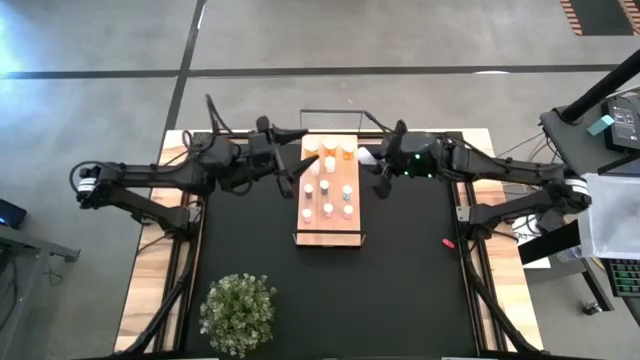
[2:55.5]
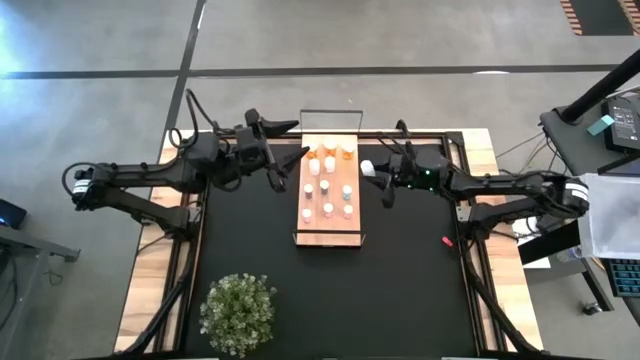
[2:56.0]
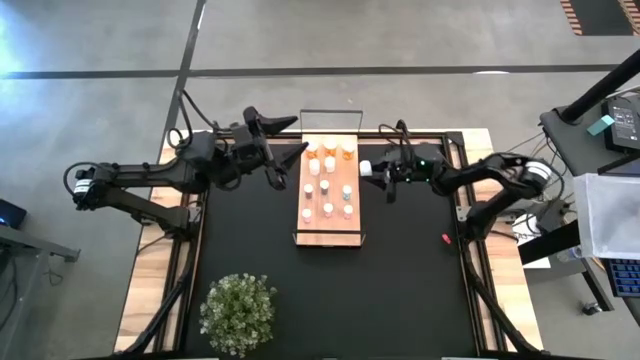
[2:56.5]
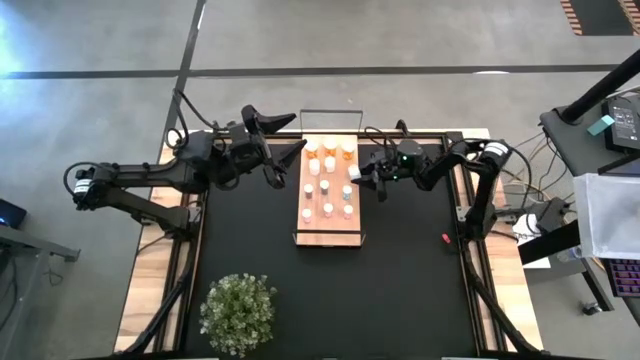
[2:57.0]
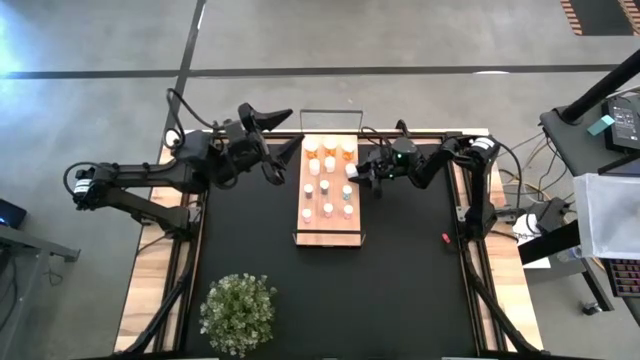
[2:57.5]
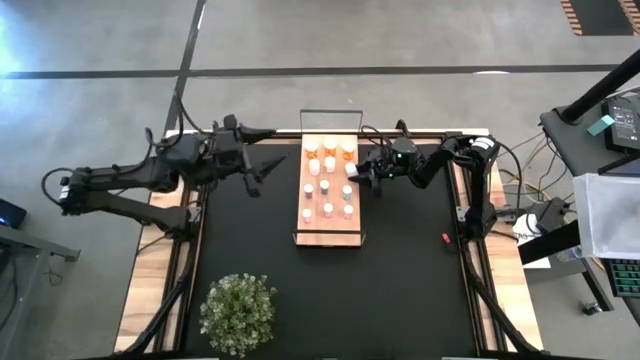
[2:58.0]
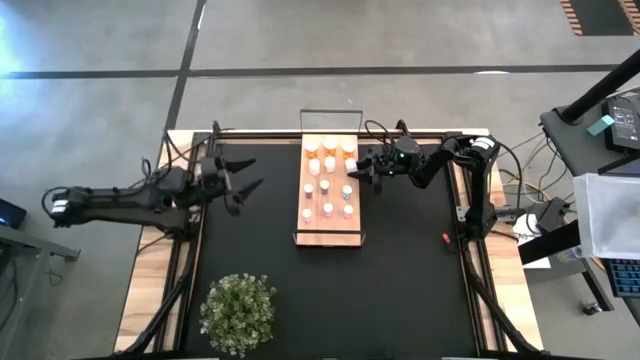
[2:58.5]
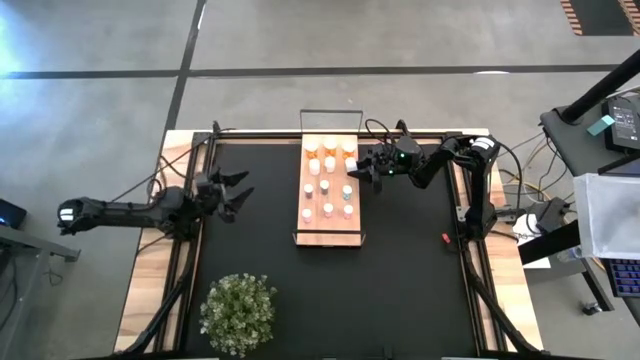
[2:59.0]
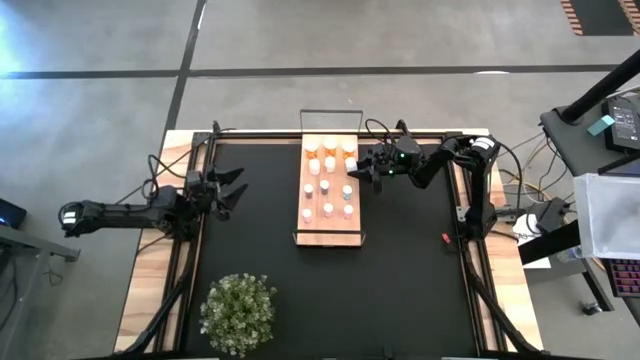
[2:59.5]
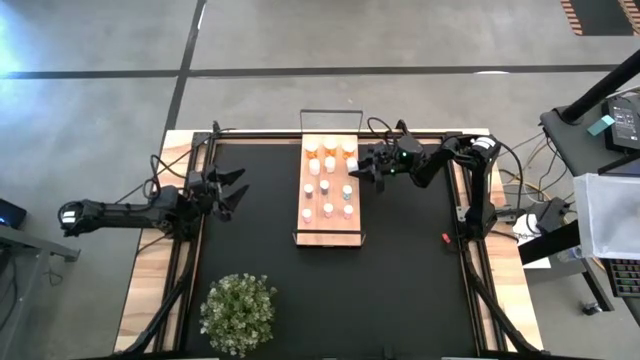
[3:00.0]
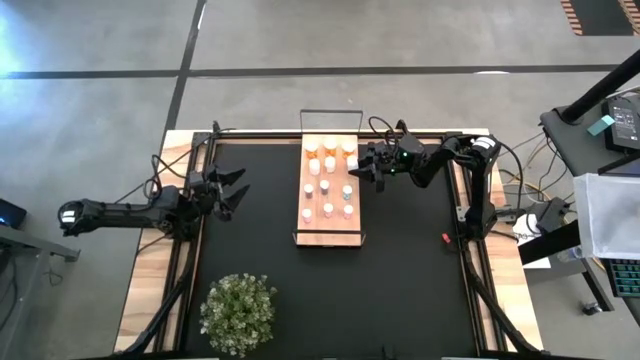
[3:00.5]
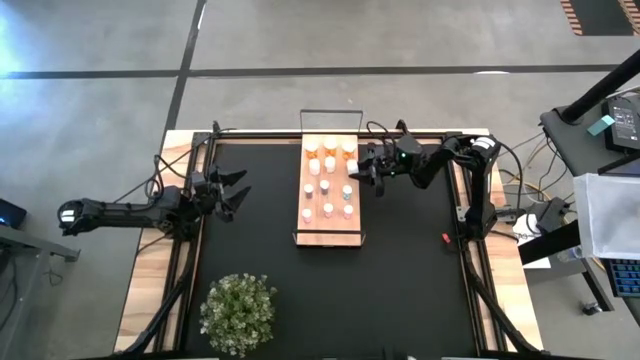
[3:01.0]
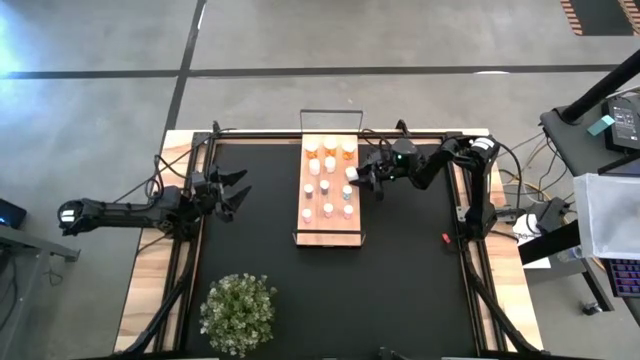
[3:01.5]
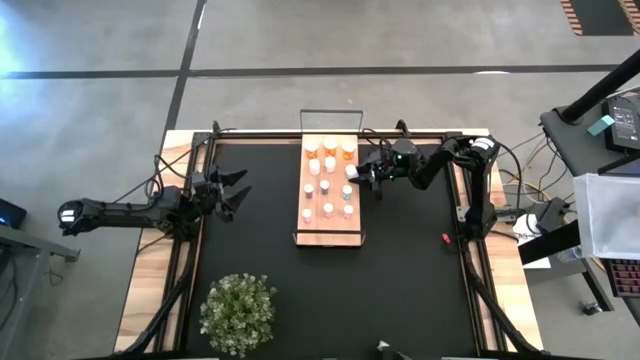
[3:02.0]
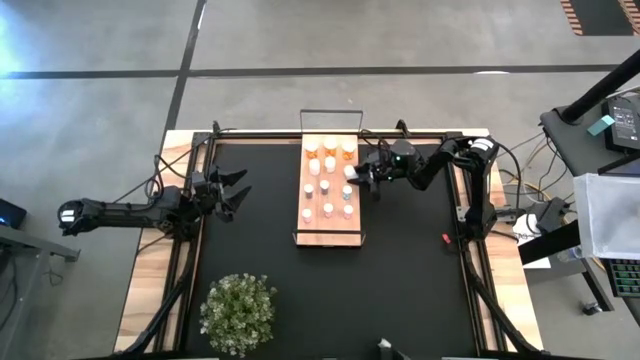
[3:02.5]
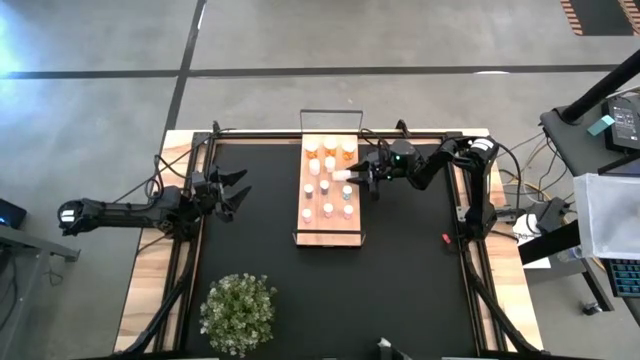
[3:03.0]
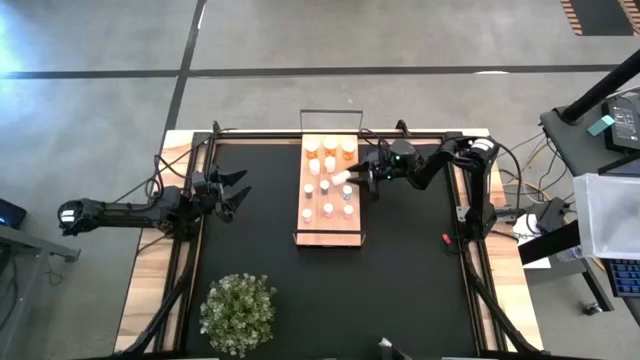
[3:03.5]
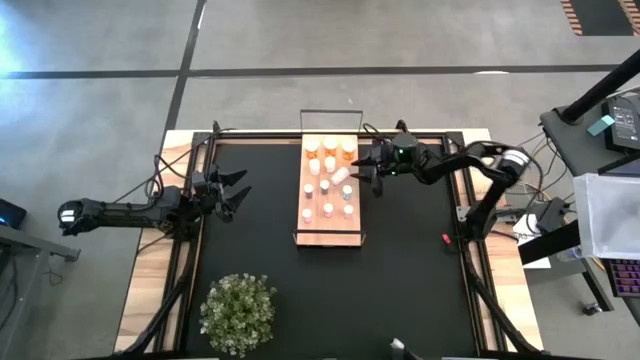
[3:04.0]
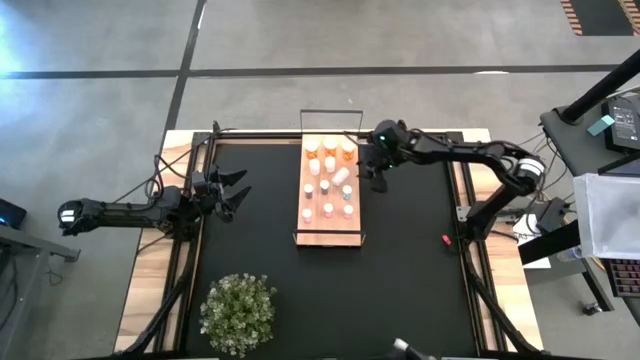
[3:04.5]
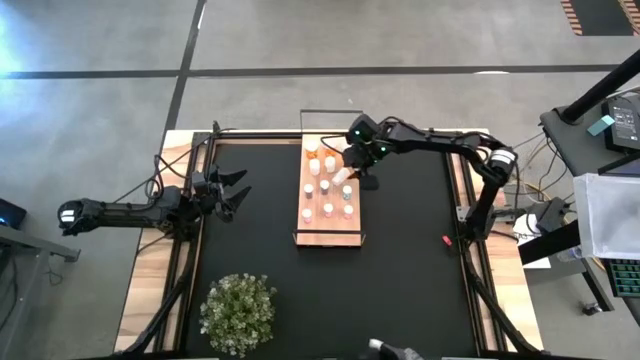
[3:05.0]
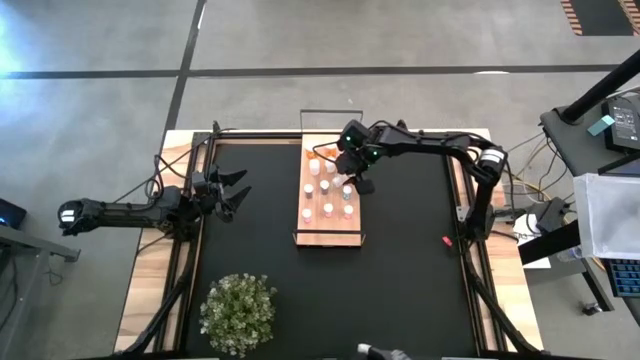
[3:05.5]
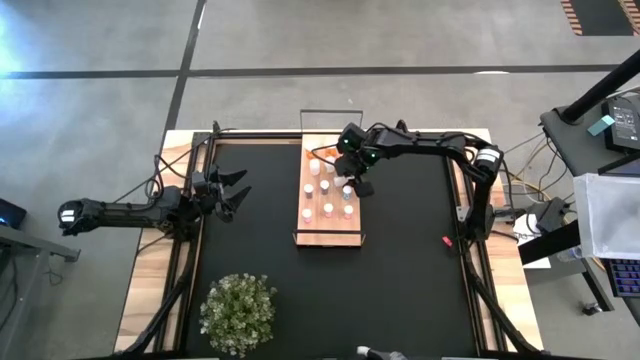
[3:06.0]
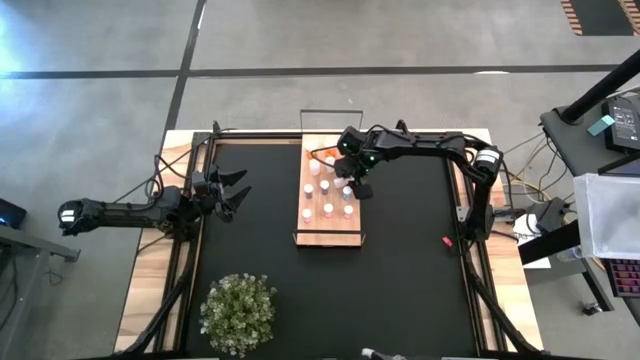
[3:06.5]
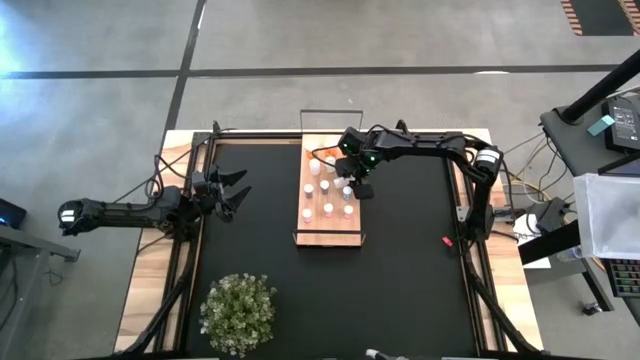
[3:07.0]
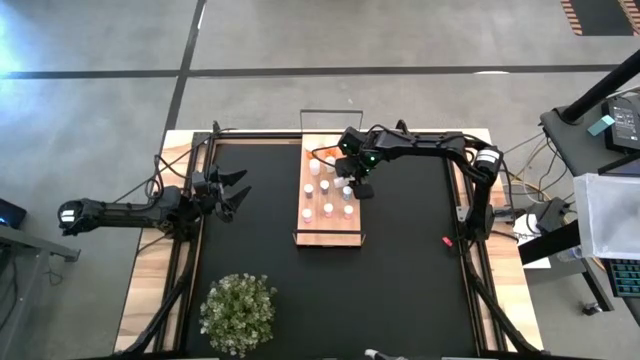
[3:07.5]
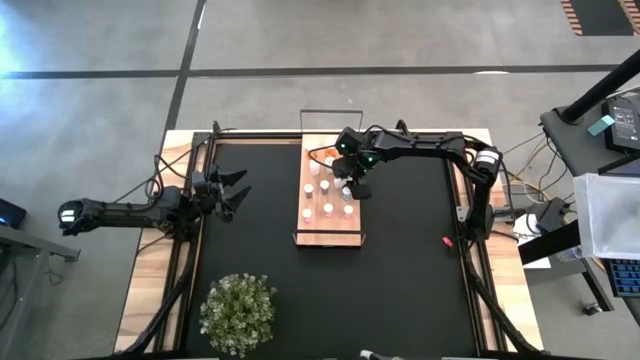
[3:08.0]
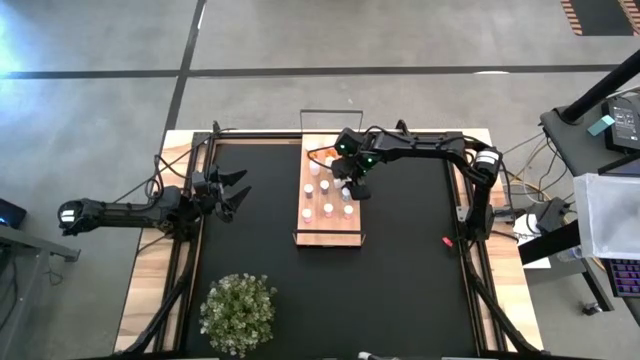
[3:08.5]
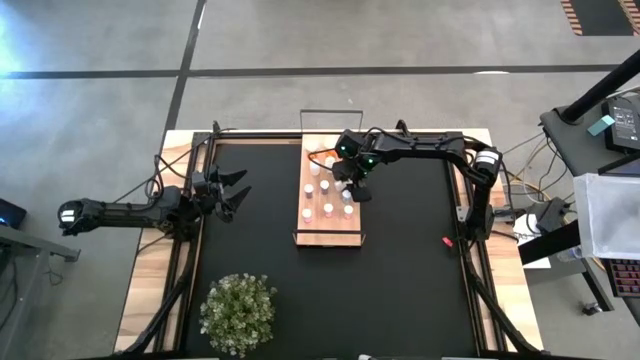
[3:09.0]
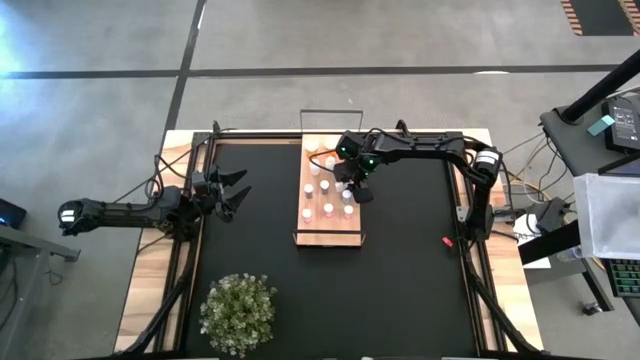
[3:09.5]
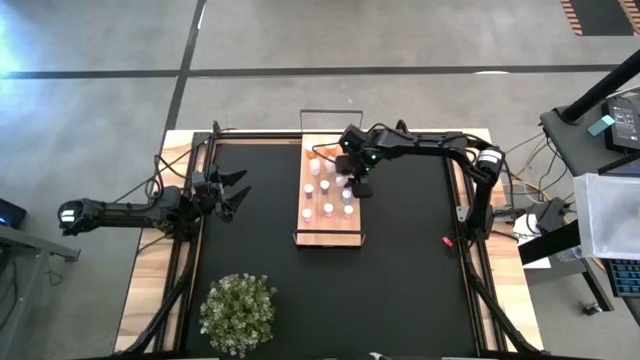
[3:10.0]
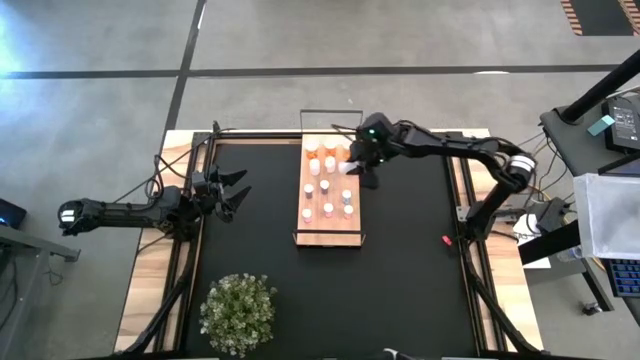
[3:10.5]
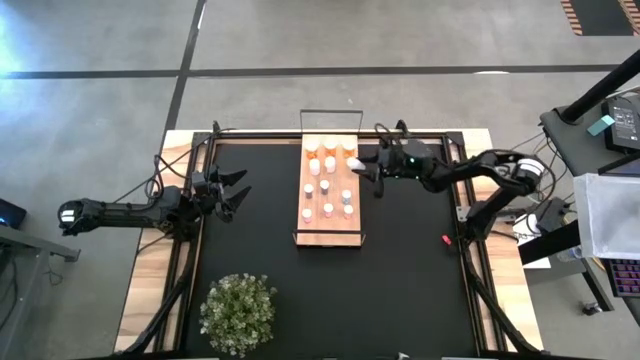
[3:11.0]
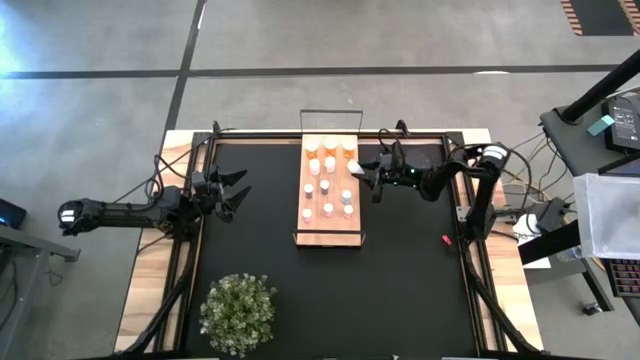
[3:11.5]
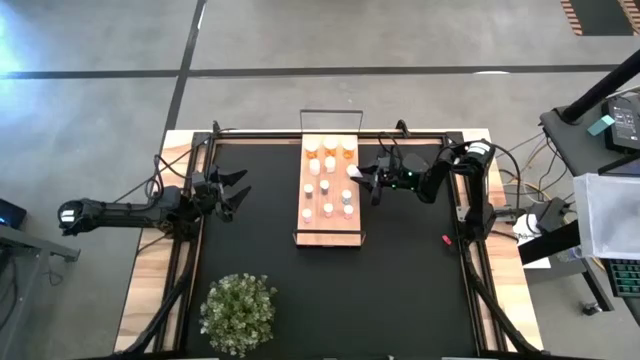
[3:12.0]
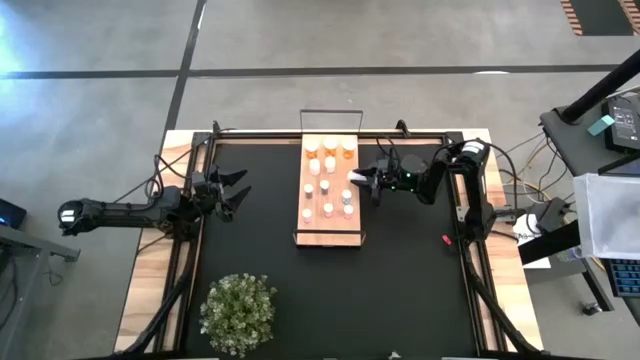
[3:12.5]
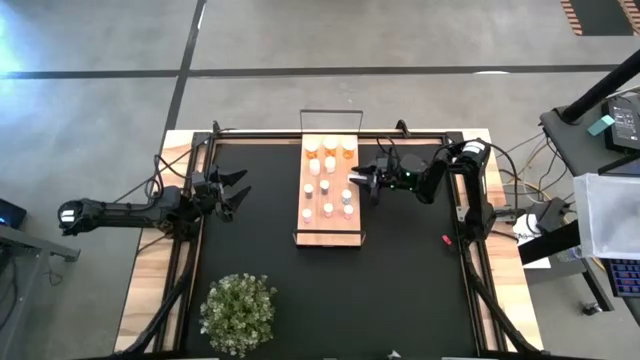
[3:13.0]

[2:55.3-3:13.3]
Task: Pick and place medicine bottles onto shelf by color
Put the white pill bottle on the shelf aligned with the other white pill bottle

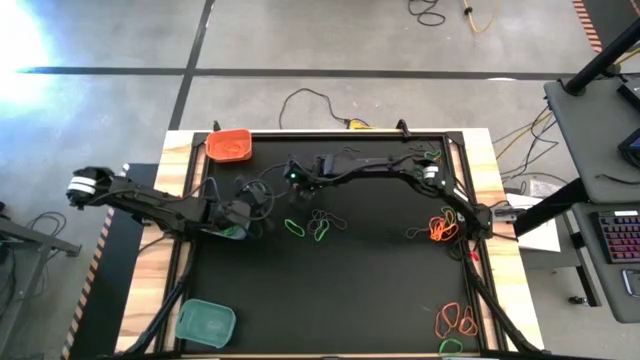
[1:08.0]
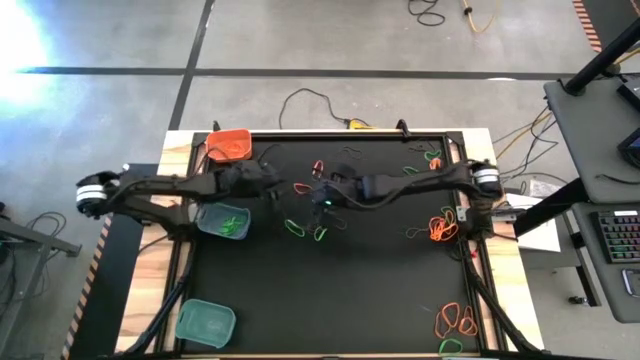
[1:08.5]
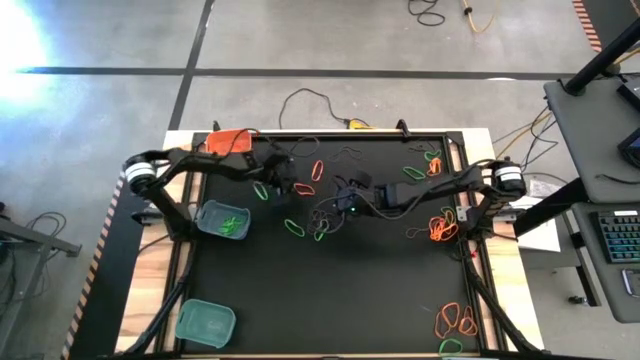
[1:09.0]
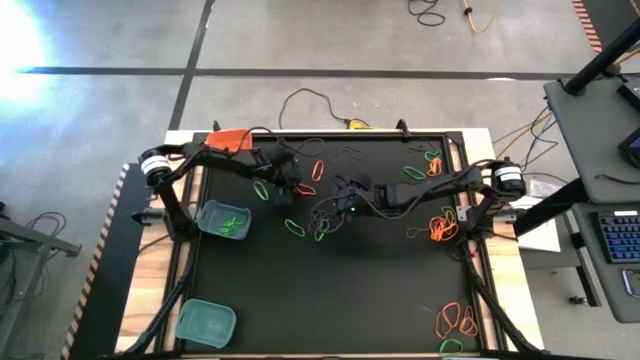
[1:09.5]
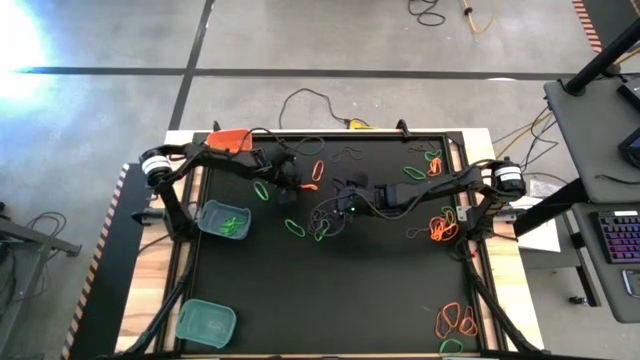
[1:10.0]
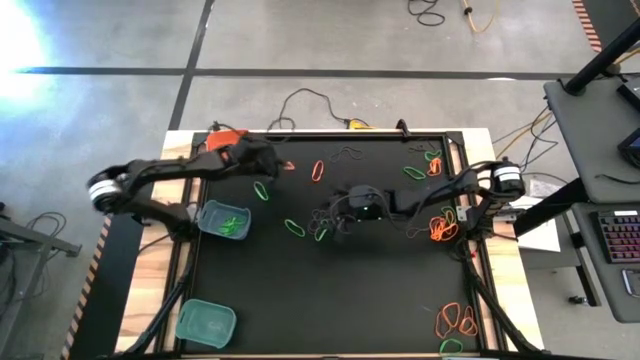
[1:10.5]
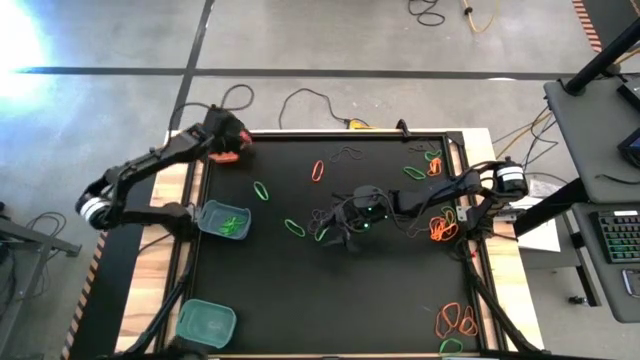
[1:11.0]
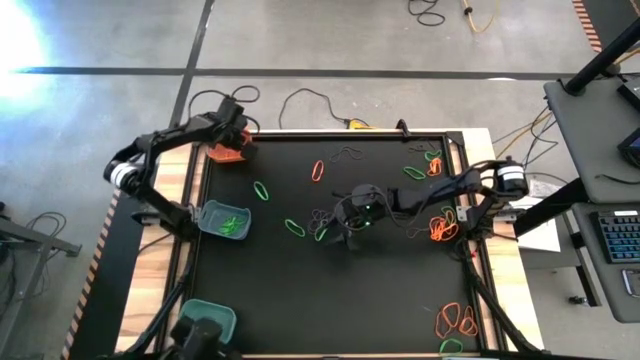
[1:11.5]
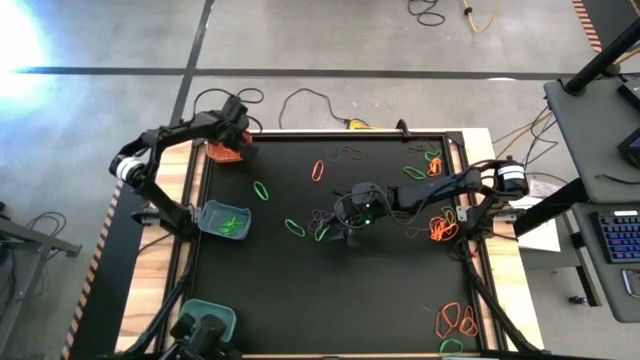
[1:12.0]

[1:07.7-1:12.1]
Task: Sort rubber bands into baskets
Put the orange rubber band into the orange bin
